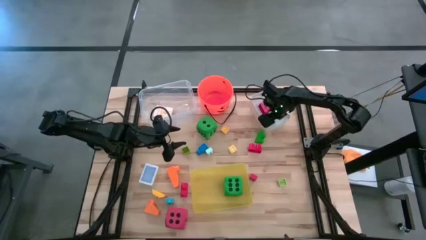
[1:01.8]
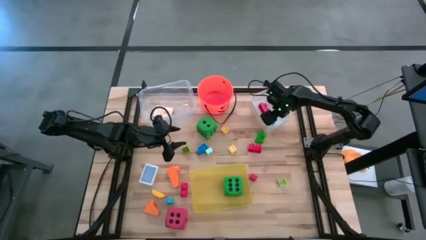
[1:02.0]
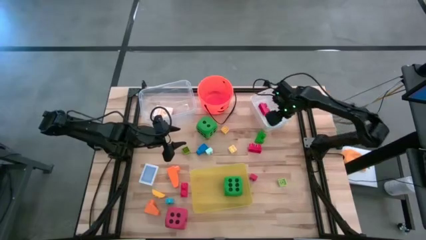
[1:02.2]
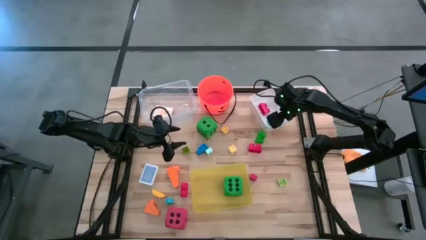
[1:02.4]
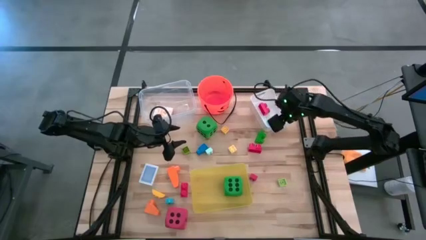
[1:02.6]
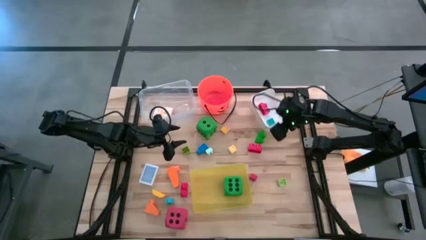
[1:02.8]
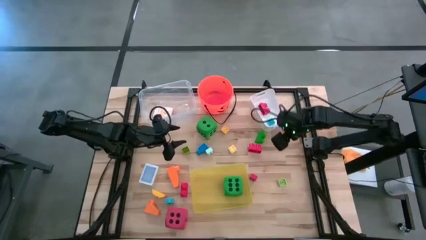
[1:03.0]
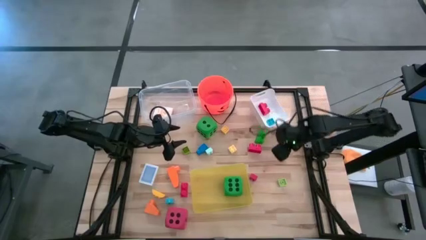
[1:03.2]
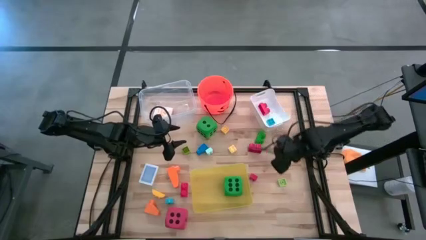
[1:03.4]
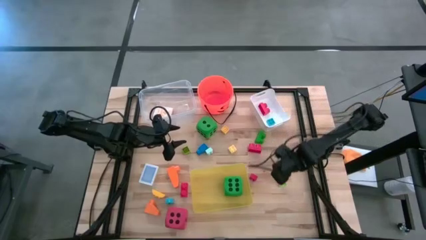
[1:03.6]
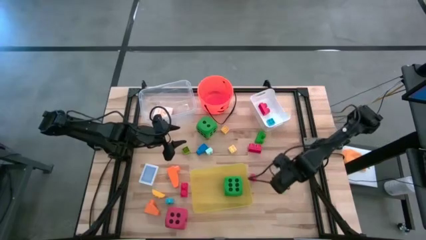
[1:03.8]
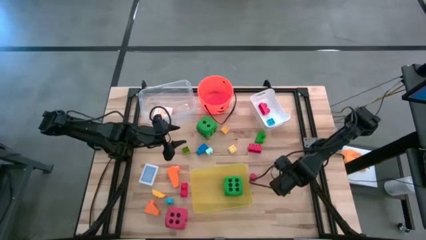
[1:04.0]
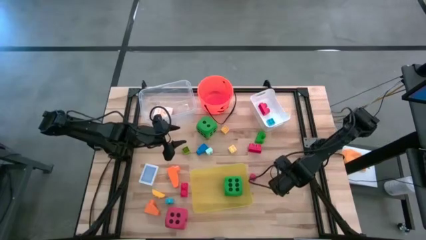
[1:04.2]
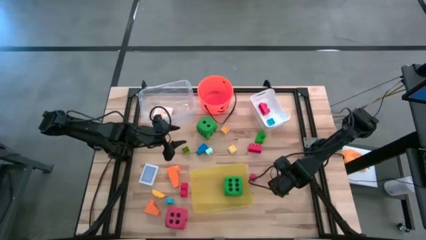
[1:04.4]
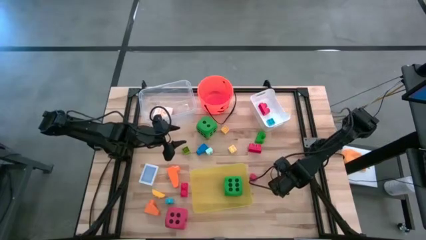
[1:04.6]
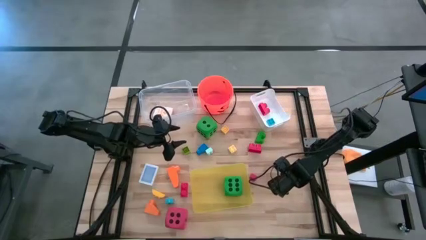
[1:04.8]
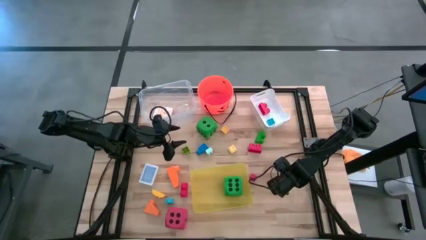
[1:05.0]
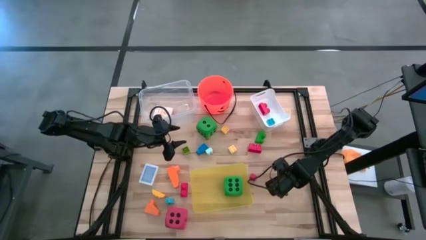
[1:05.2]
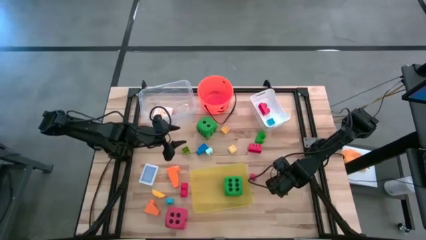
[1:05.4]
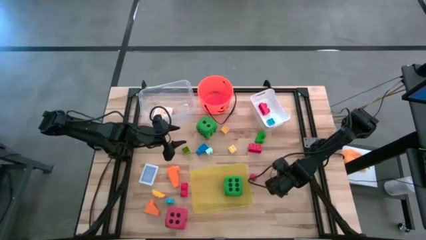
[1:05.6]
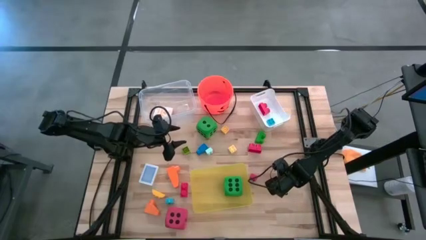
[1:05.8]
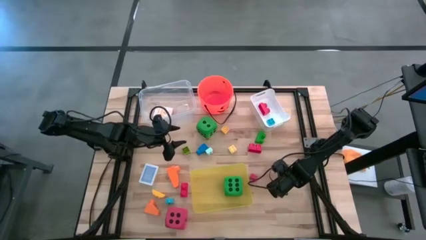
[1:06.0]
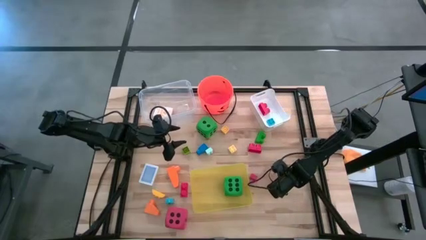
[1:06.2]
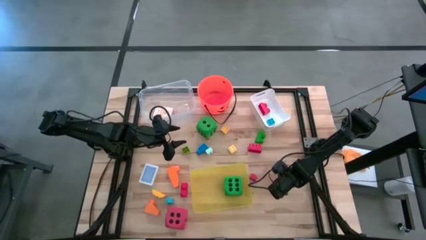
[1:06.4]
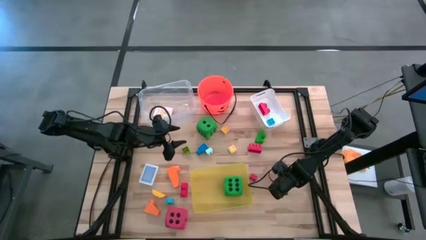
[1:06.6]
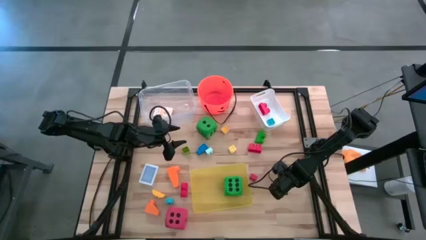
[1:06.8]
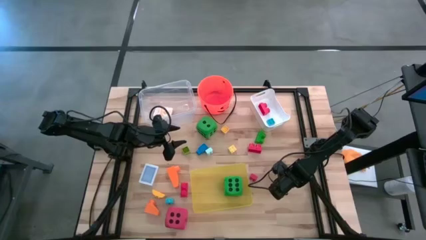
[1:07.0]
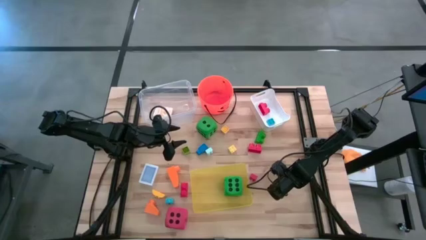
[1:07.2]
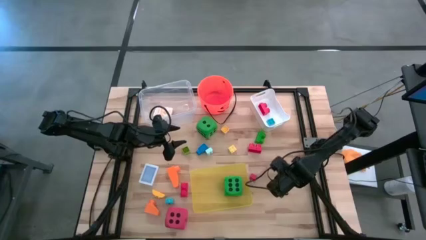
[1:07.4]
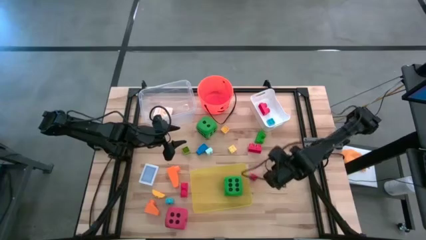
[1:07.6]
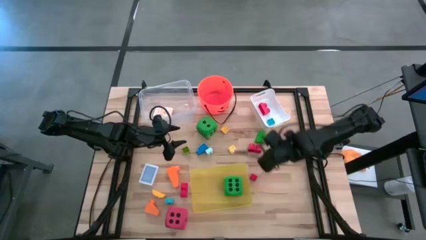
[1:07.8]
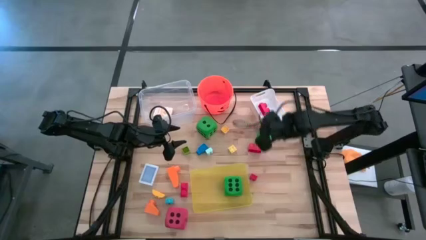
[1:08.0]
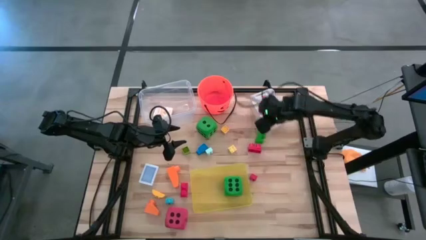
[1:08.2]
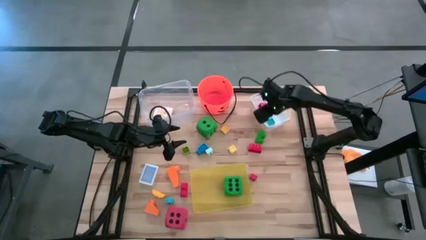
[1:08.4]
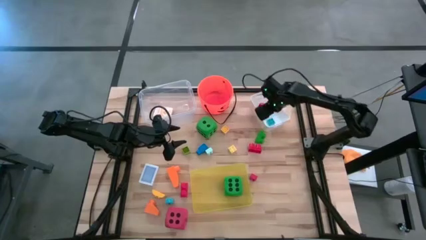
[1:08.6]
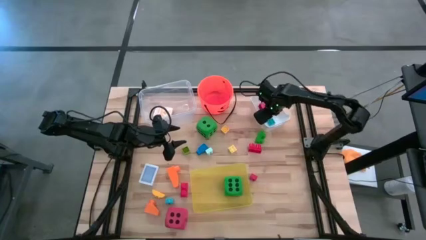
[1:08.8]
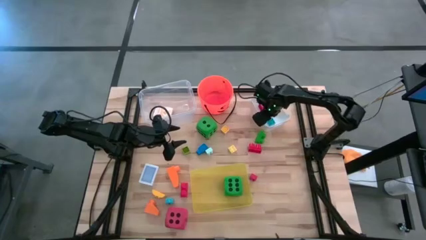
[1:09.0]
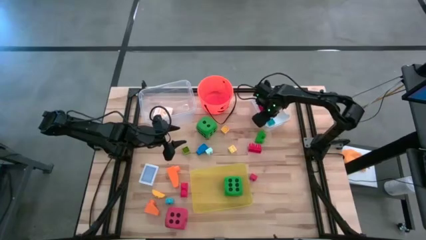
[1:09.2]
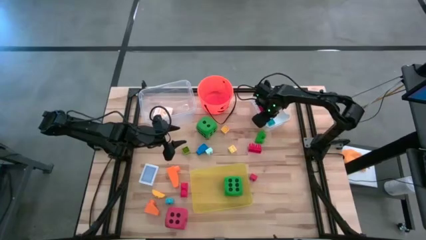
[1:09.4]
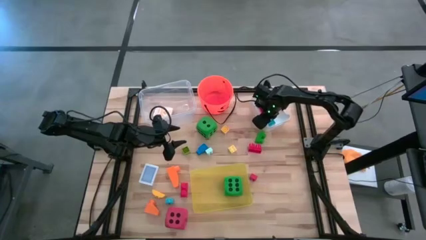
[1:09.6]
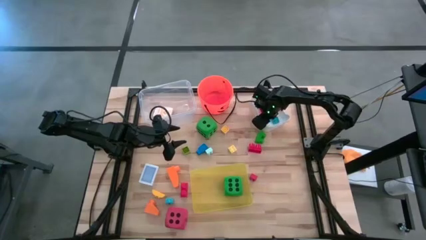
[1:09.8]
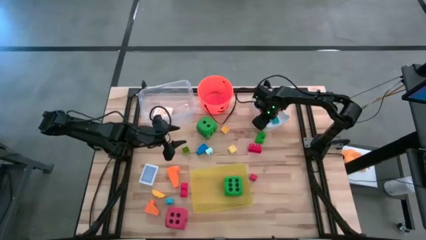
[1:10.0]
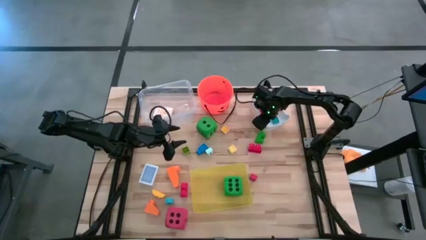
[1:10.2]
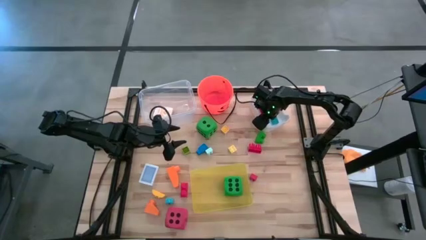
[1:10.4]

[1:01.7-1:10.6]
Task: Pick & Place Toys
Put the light green game piece into the white bin

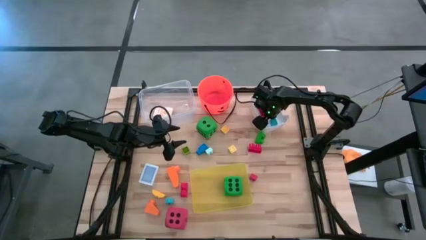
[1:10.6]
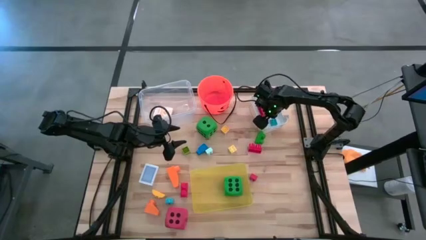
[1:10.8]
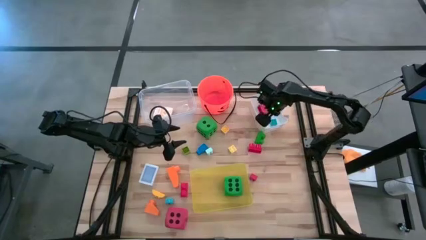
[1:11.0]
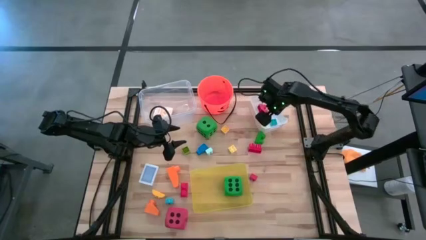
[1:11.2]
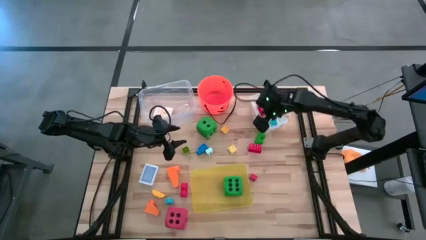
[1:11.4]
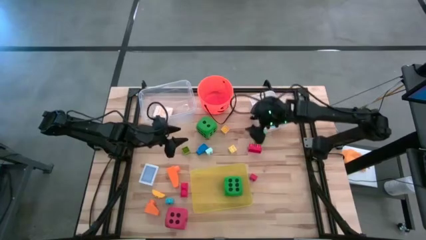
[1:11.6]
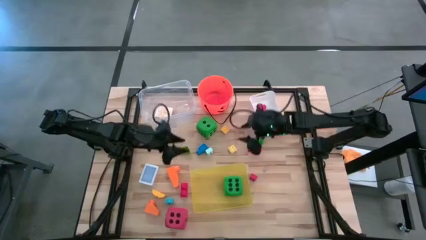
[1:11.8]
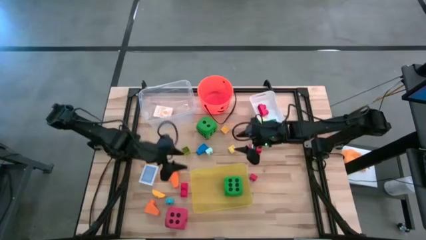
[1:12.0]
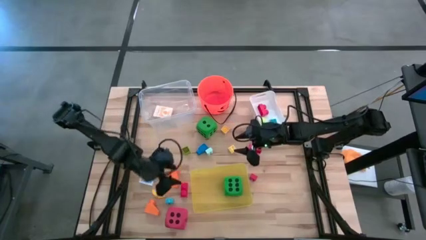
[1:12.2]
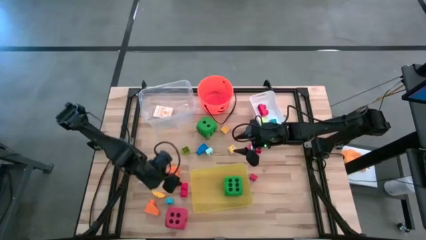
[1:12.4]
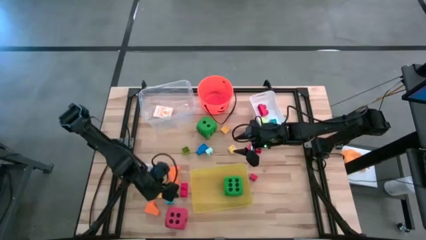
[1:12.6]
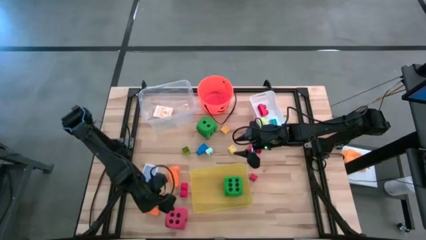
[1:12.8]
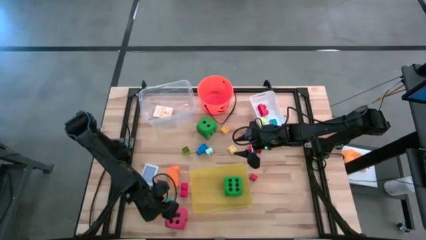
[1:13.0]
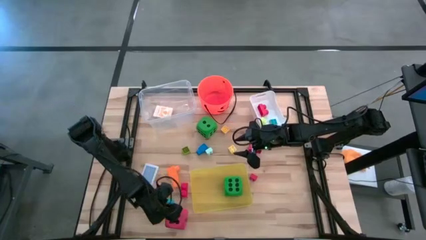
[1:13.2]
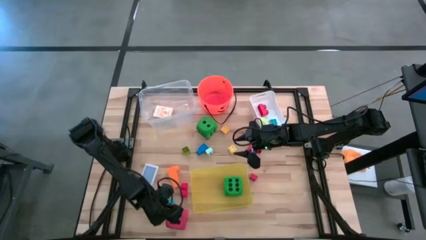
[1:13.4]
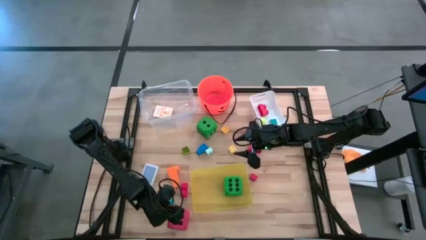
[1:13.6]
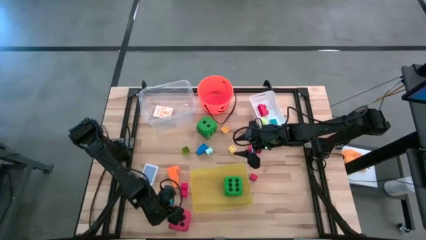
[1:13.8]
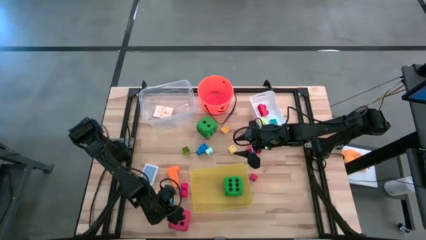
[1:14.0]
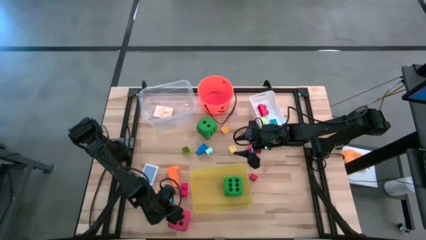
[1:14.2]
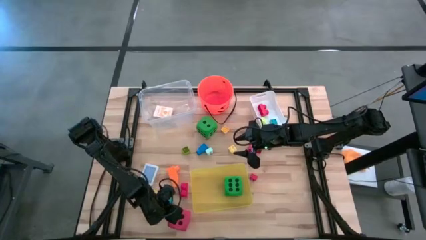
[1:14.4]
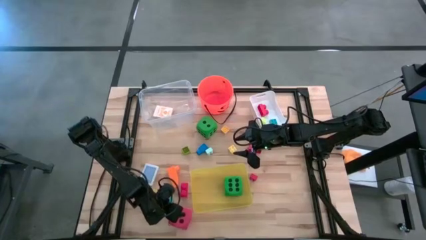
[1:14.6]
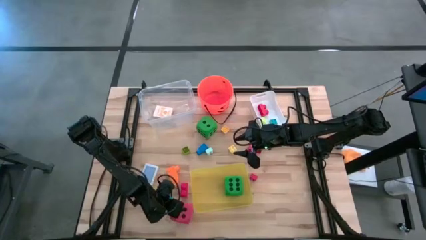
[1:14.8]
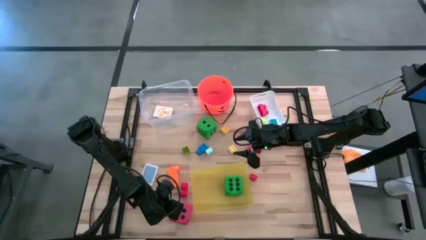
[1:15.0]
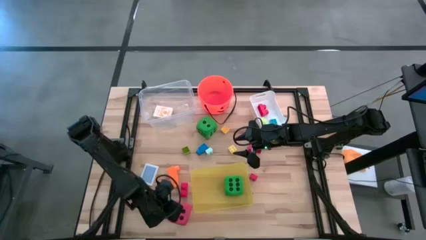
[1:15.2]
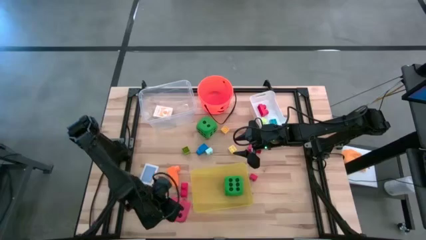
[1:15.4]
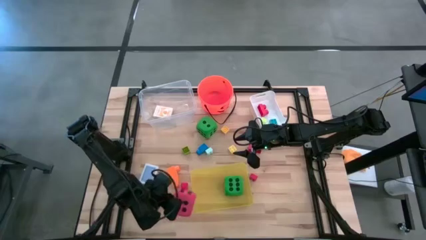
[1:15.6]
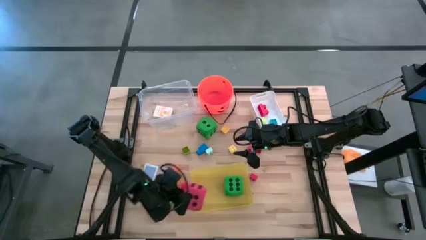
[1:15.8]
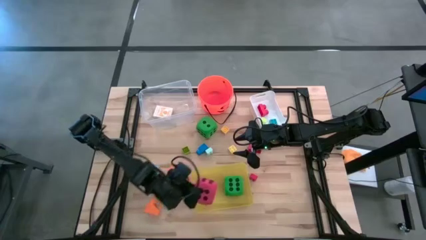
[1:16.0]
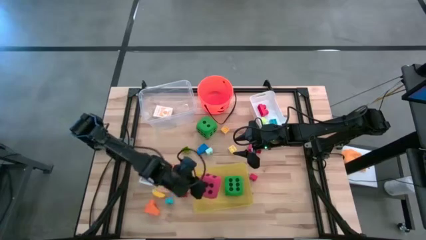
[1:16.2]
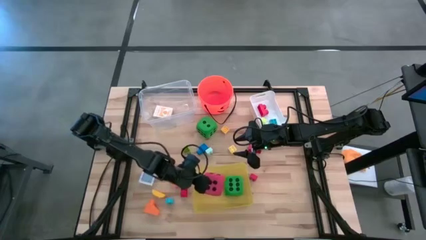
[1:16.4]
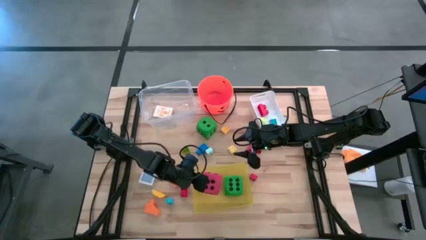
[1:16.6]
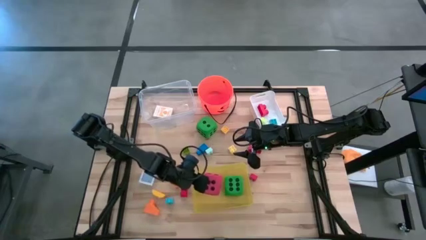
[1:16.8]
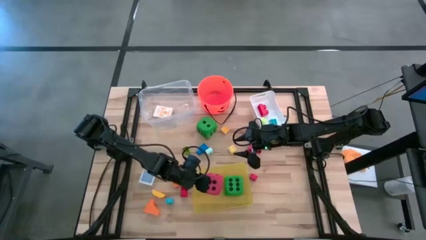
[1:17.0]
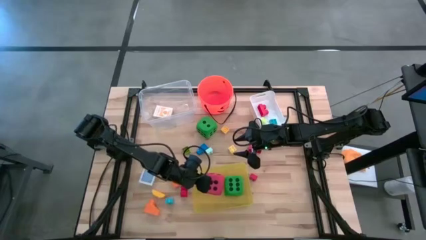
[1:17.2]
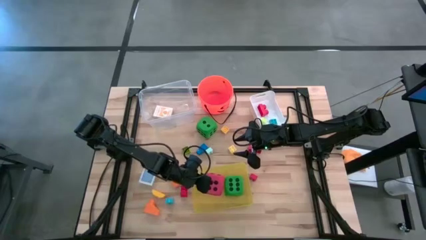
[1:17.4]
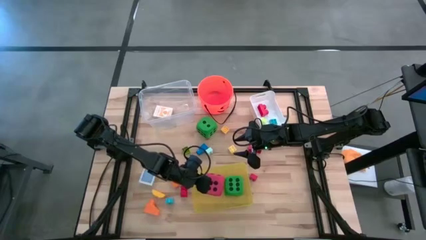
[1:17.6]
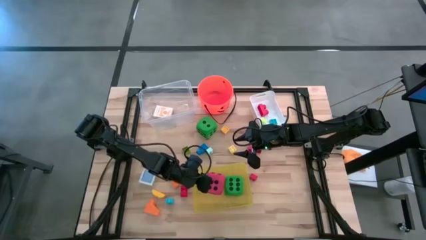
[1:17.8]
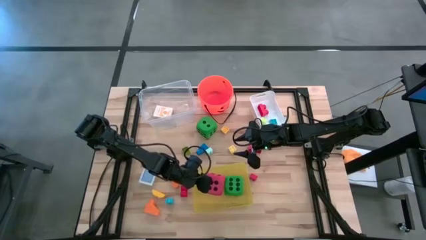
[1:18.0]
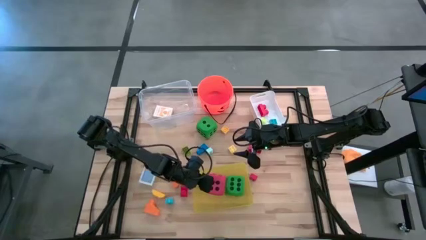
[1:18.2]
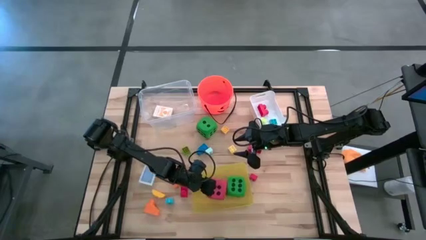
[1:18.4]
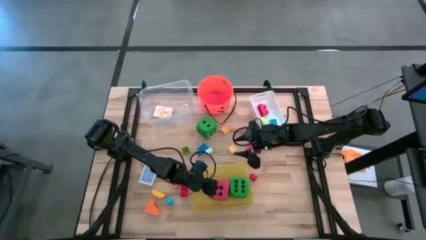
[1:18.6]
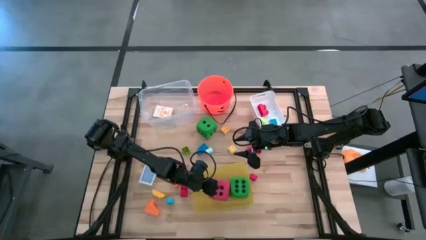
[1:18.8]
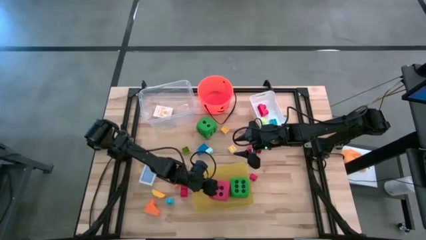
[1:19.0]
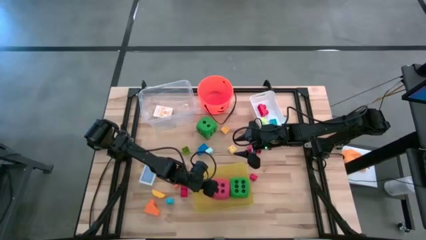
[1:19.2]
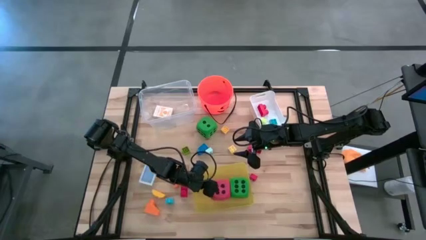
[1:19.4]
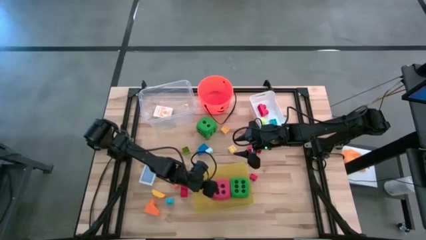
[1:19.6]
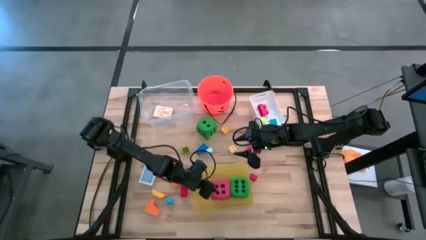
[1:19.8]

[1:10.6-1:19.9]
Put the red die into the yellow bin
